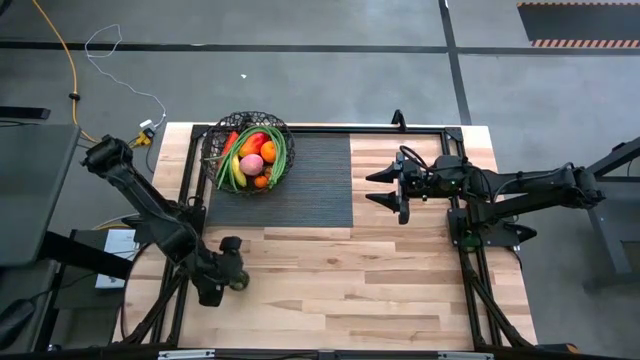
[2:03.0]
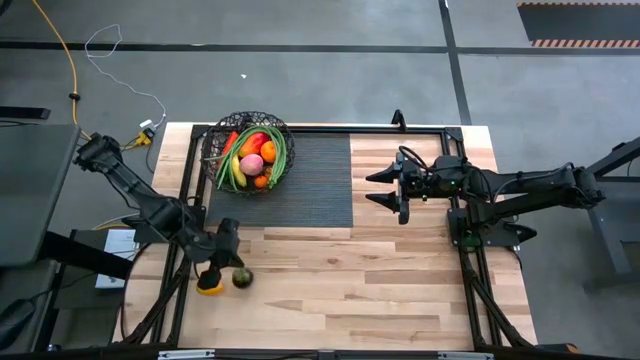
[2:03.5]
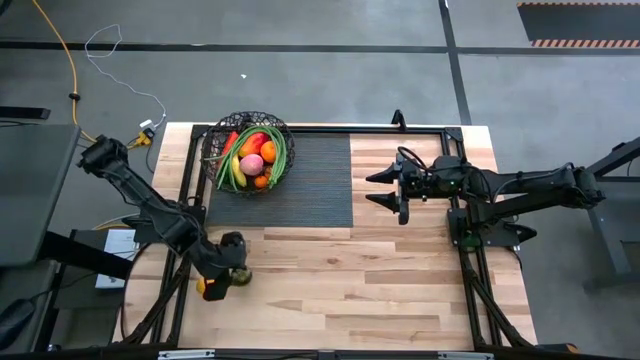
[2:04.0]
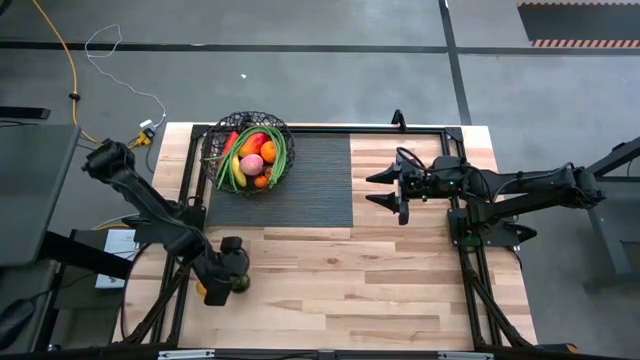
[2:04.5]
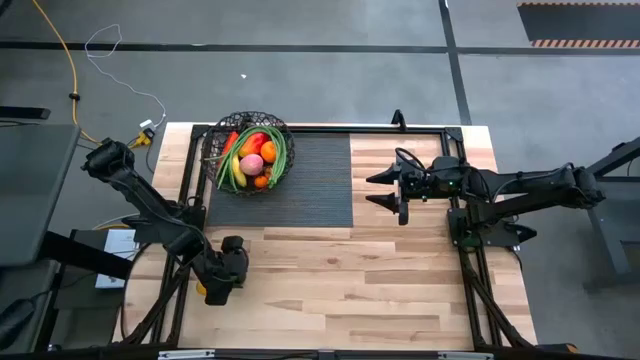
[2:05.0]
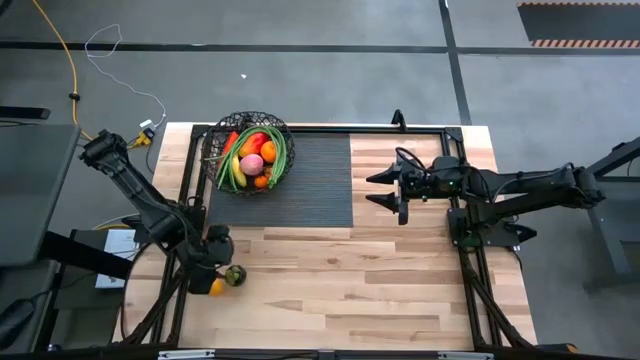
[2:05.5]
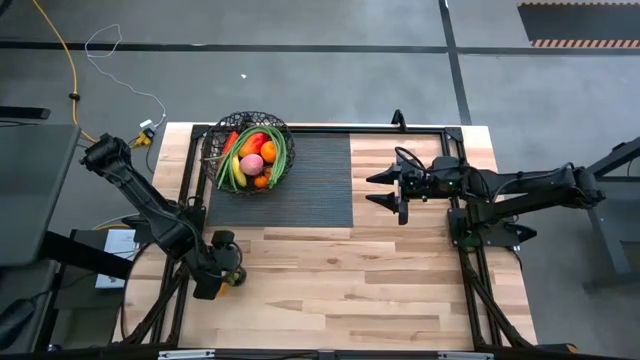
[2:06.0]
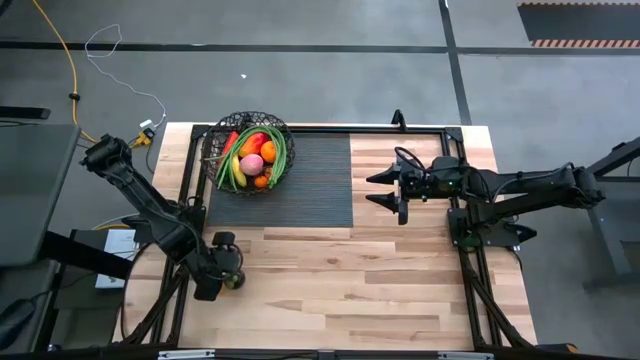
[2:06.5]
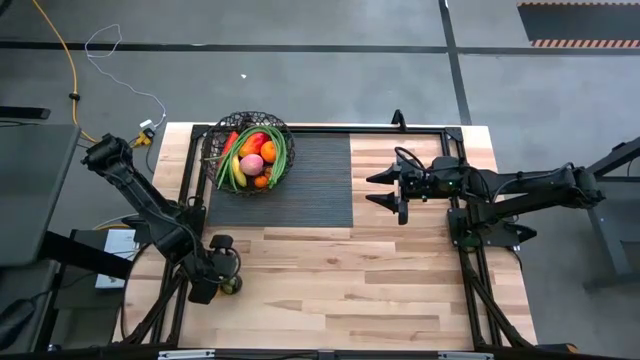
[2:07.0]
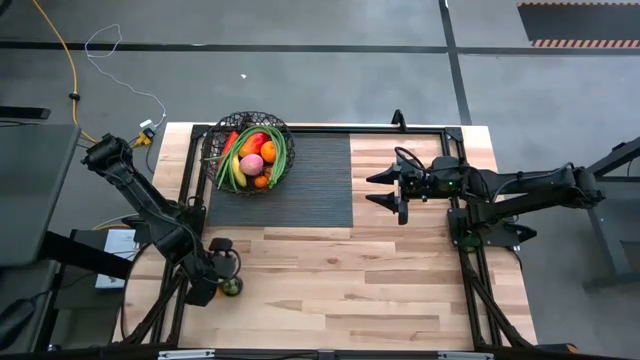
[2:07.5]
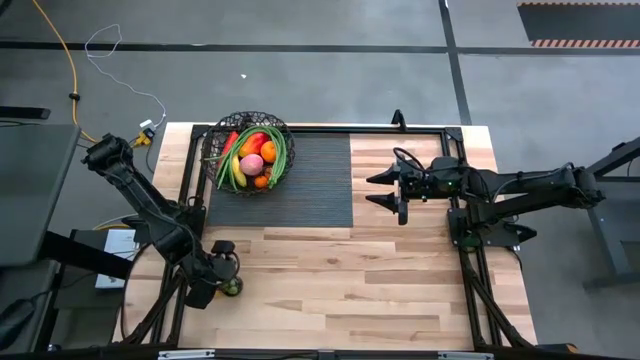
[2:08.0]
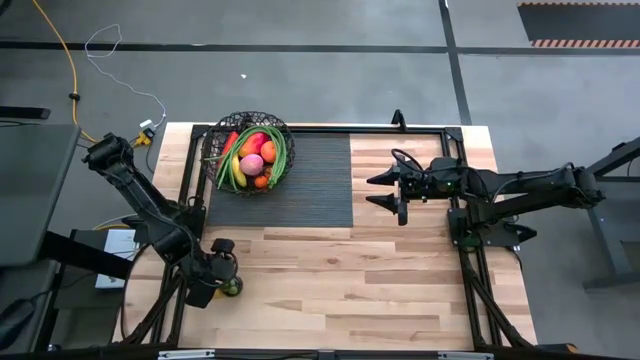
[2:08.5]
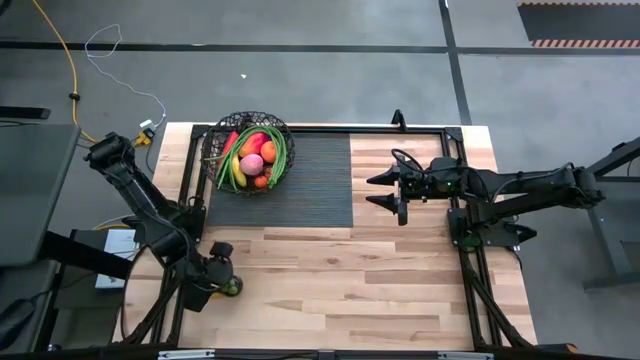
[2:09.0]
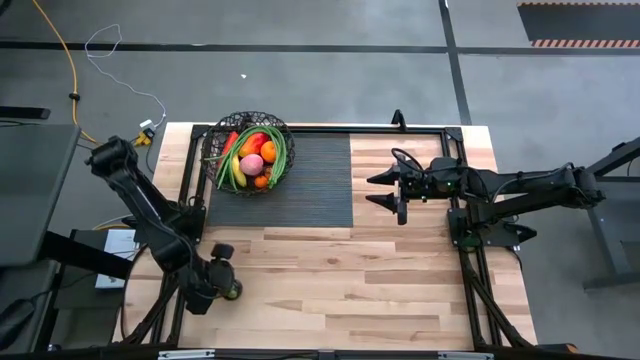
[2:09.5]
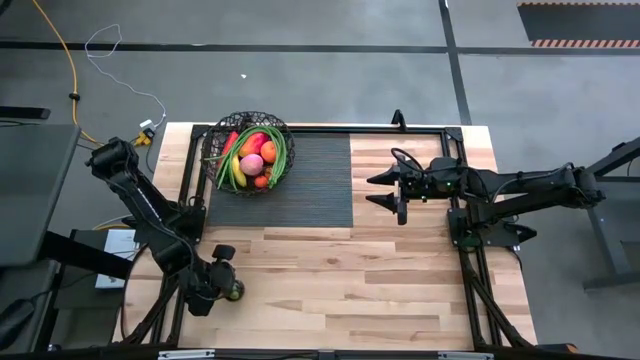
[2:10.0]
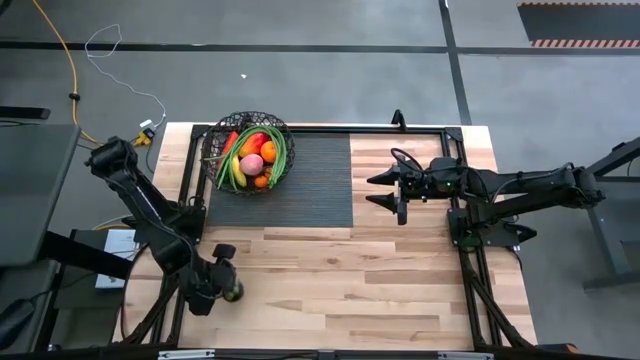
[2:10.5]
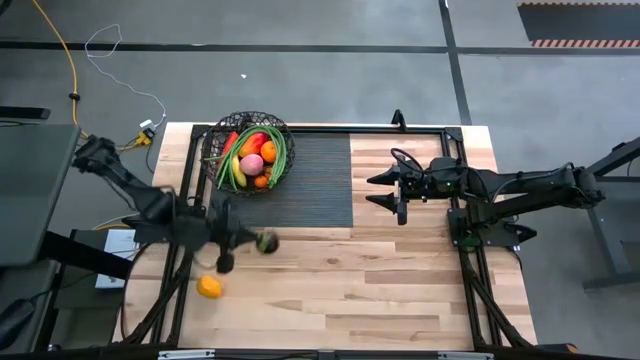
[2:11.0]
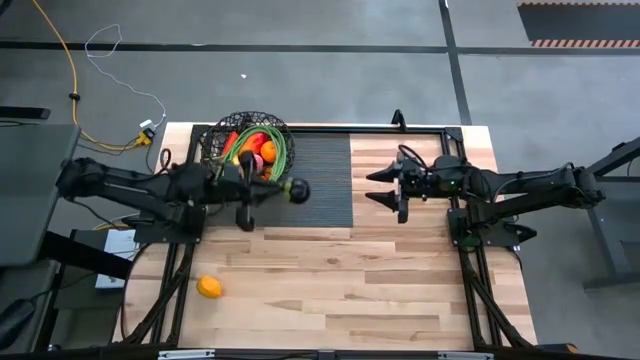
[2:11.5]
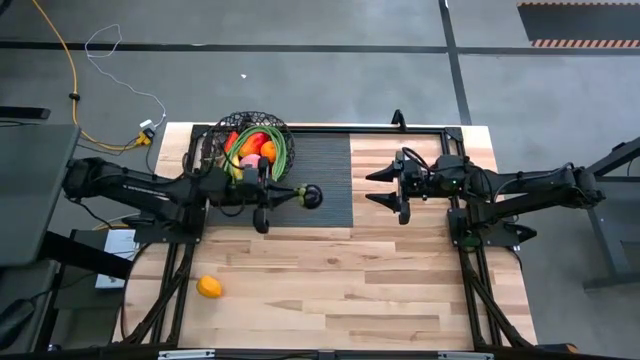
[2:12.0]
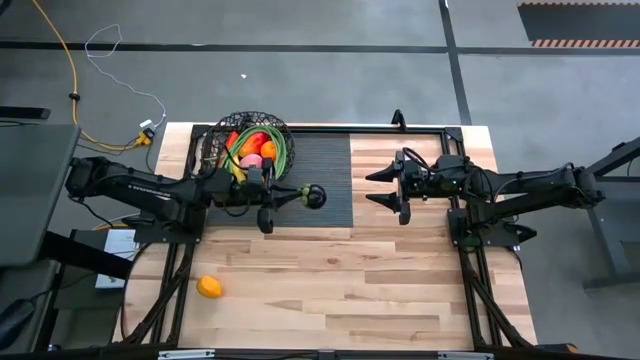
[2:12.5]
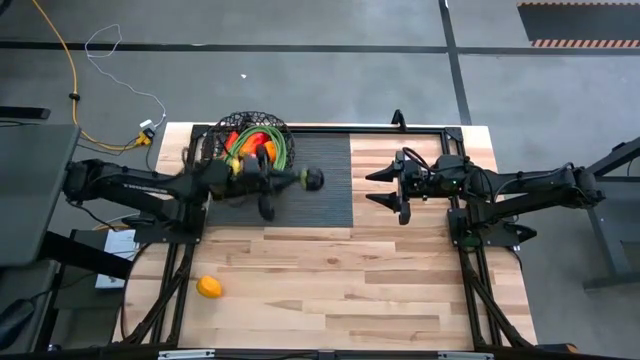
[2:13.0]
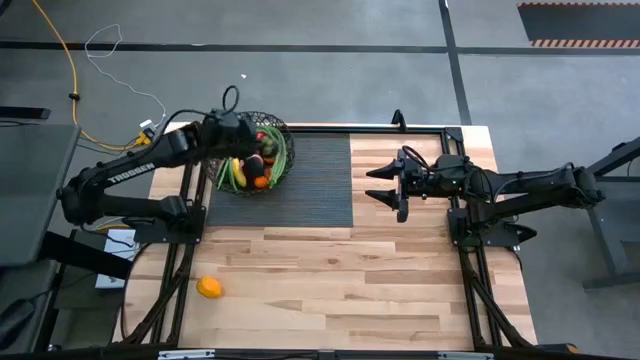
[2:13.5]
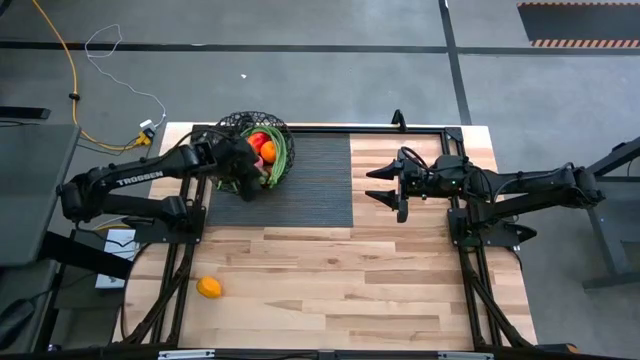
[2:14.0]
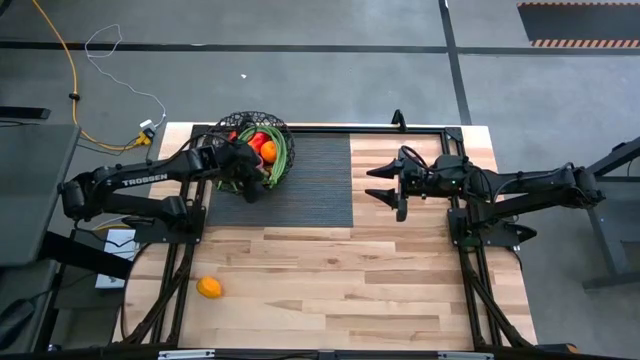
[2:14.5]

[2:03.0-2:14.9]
Task: Build produce basket
Put the black mangosteen into the black basket

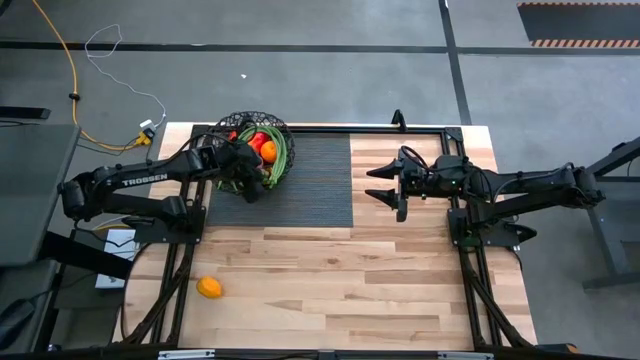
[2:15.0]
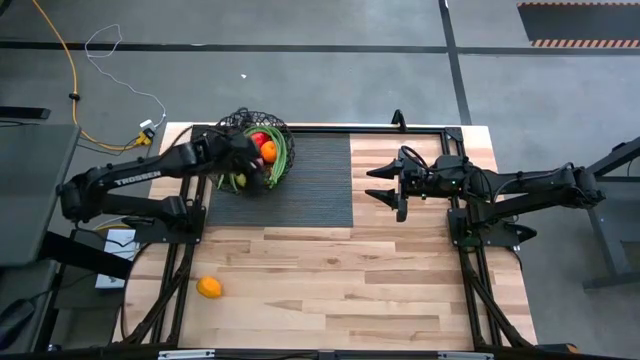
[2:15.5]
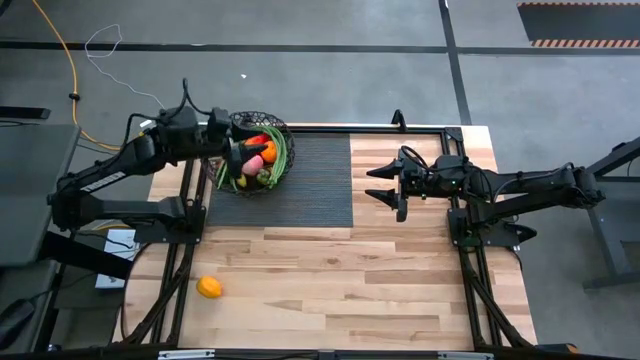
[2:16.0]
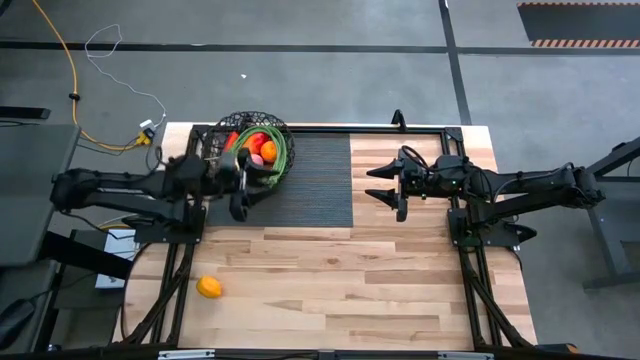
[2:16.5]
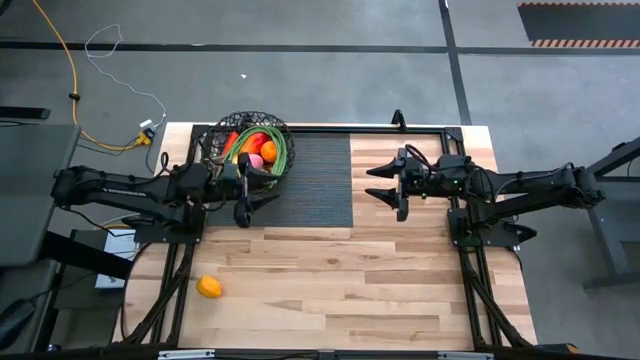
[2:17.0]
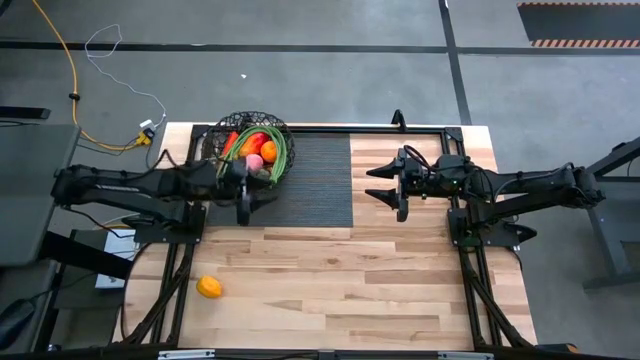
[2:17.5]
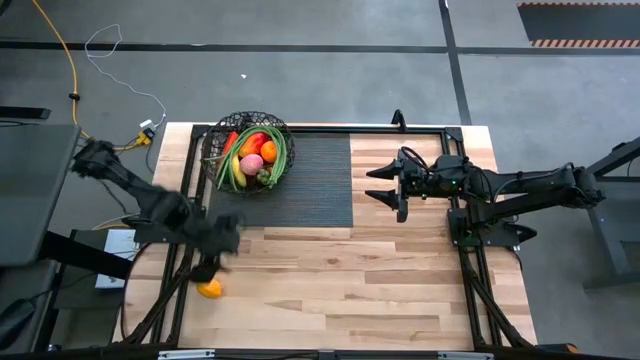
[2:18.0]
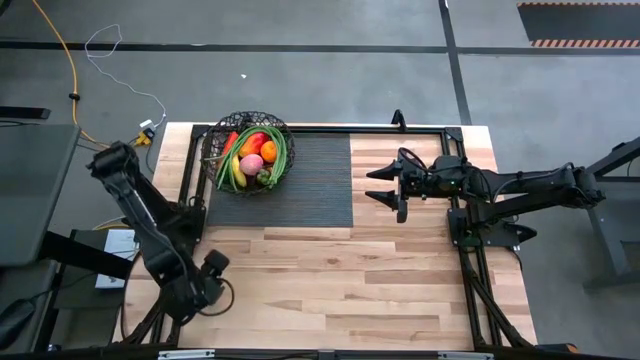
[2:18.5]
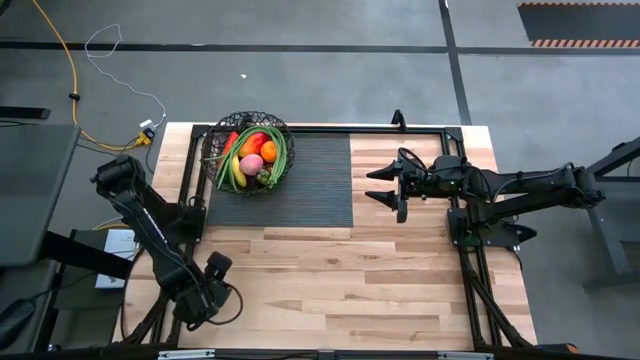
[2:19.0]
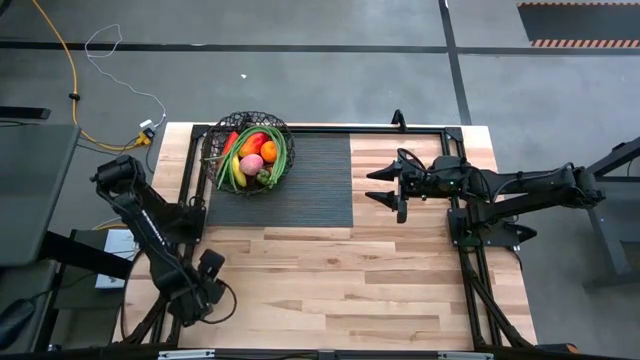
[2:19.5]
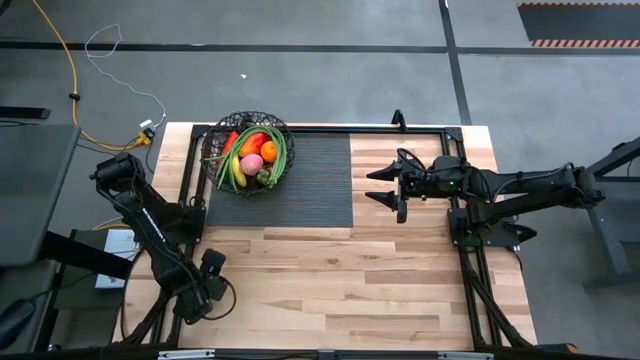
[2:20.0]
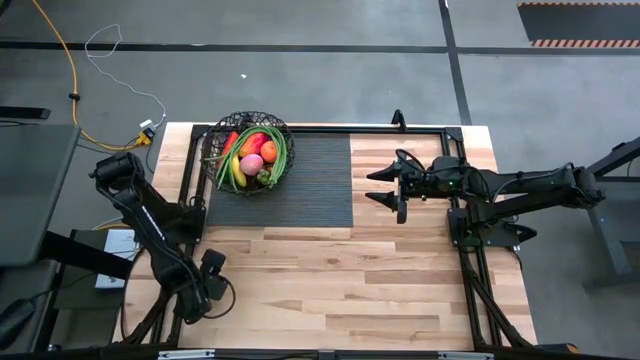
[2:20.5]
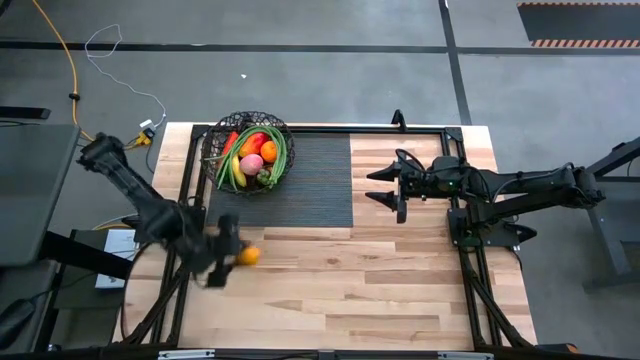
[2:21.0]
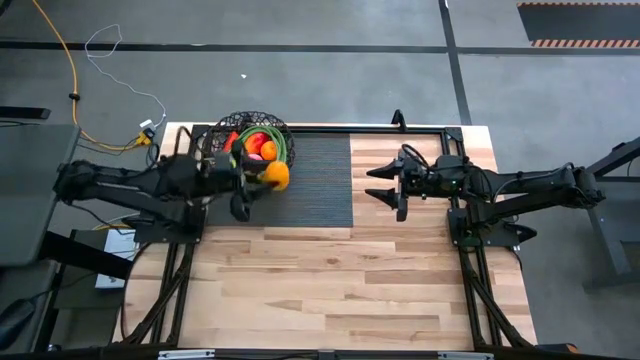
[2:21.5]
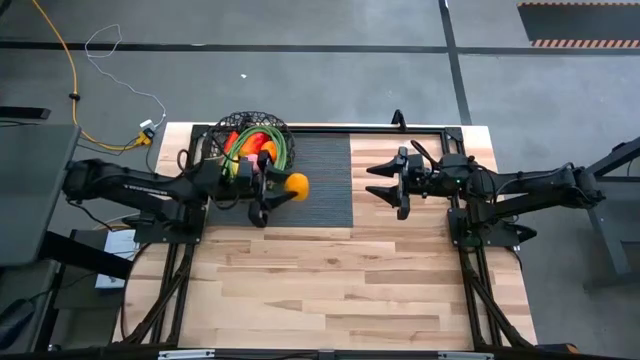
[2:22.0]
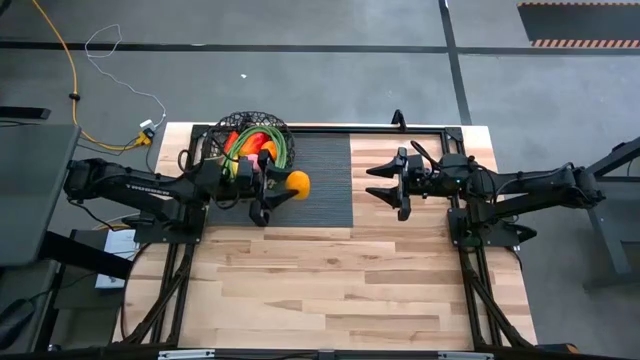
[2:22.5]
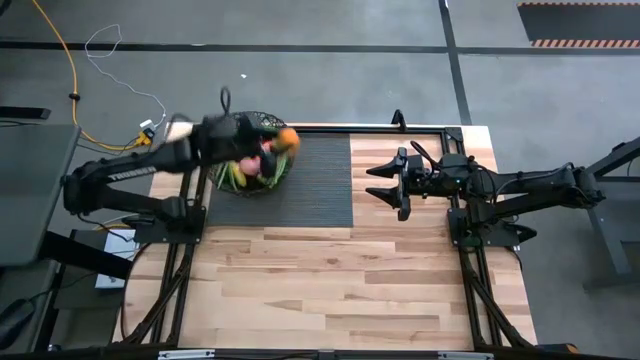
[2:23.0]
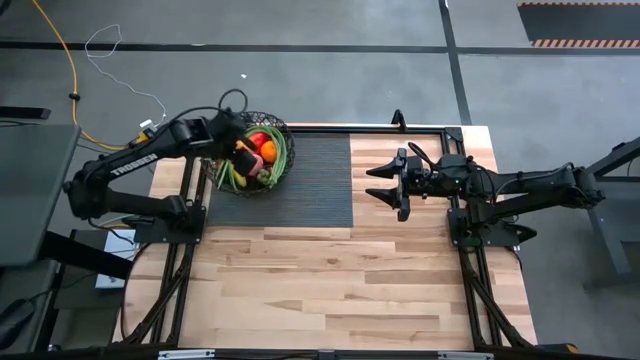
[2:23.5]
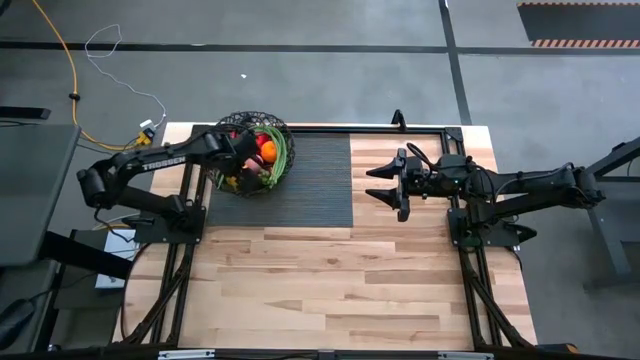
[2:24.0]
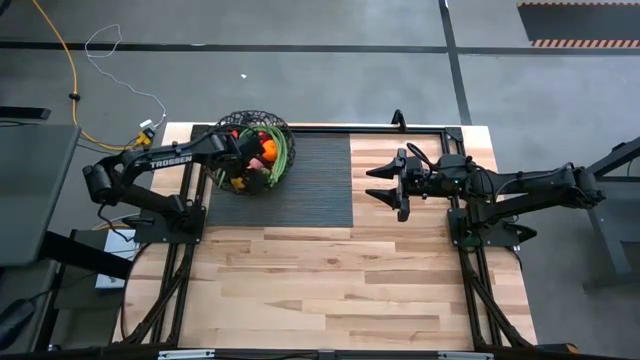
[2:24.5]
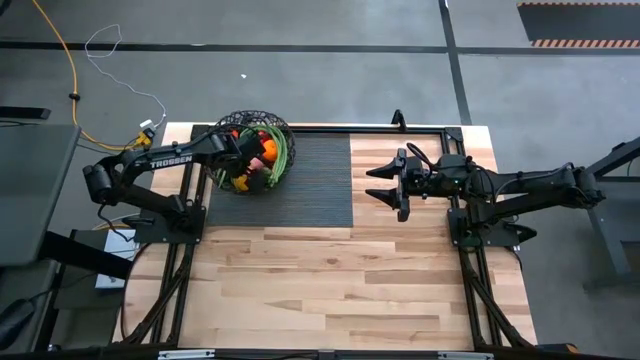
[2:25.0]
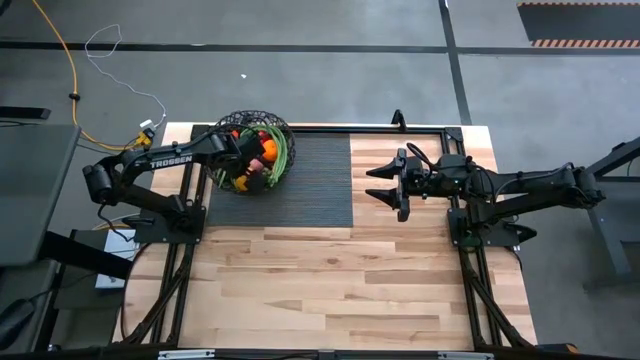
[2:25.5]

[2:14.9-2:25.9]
Put the yellow lemon into the black basket
